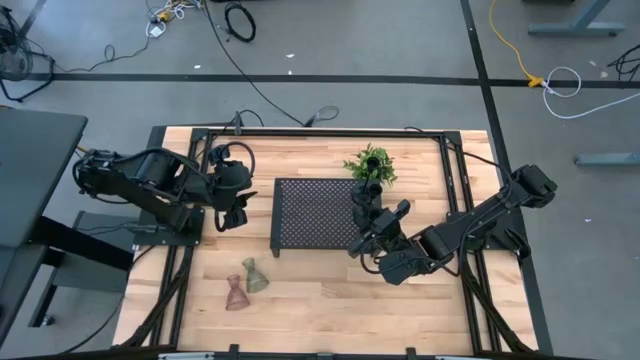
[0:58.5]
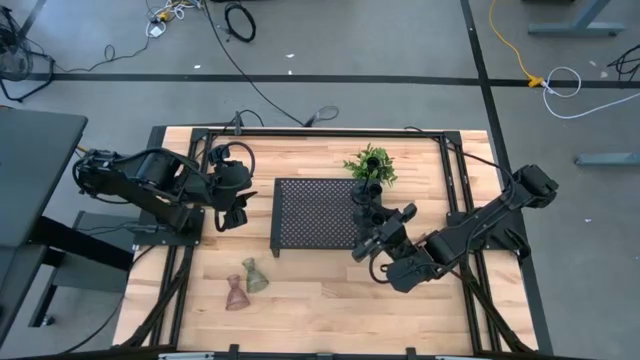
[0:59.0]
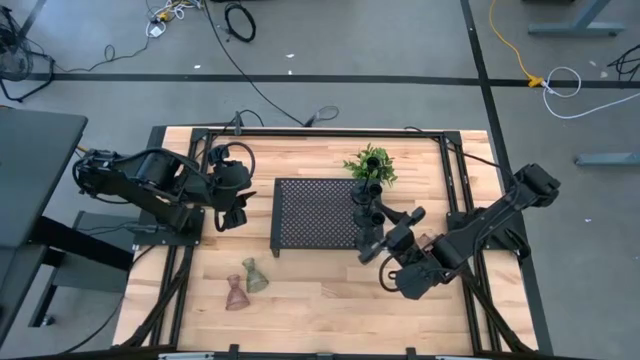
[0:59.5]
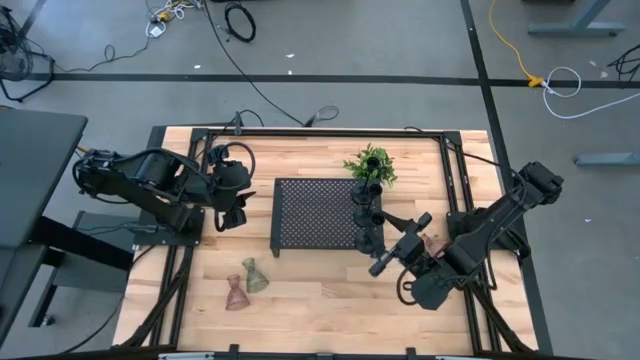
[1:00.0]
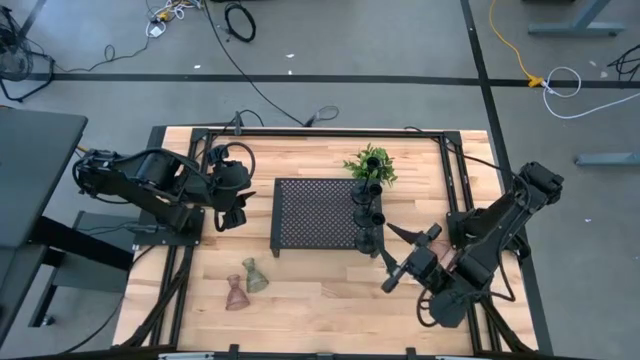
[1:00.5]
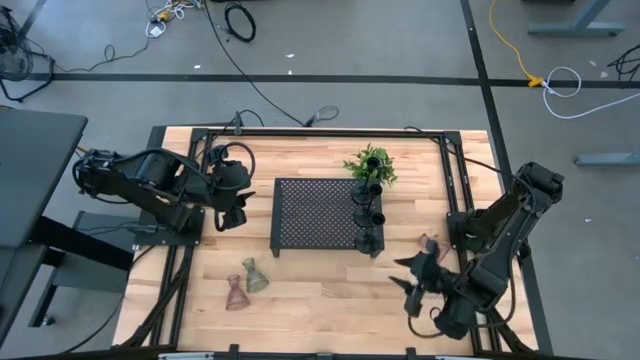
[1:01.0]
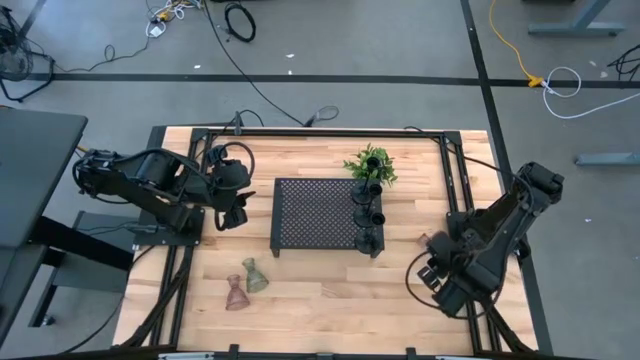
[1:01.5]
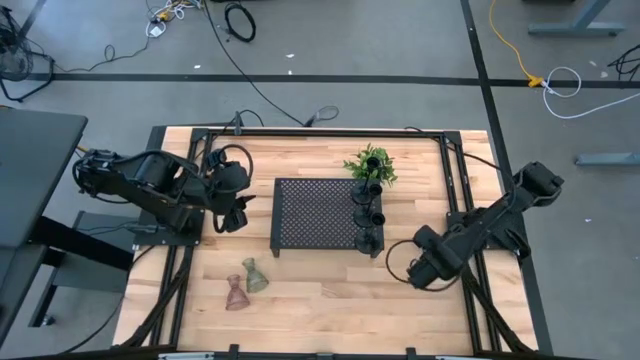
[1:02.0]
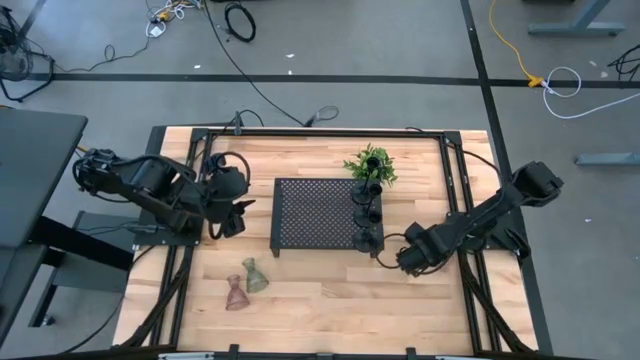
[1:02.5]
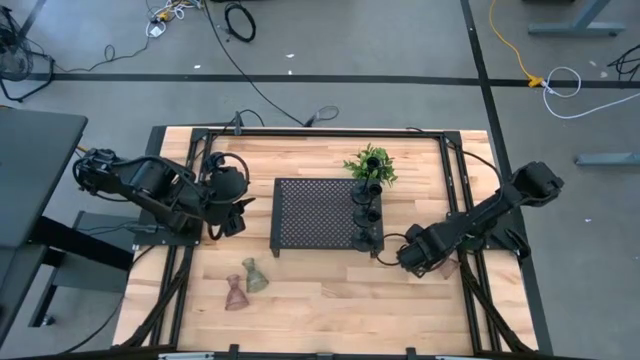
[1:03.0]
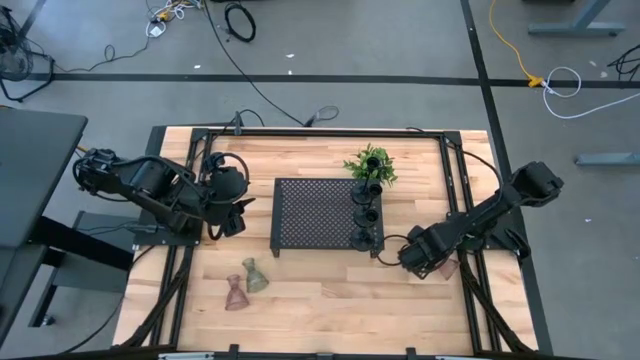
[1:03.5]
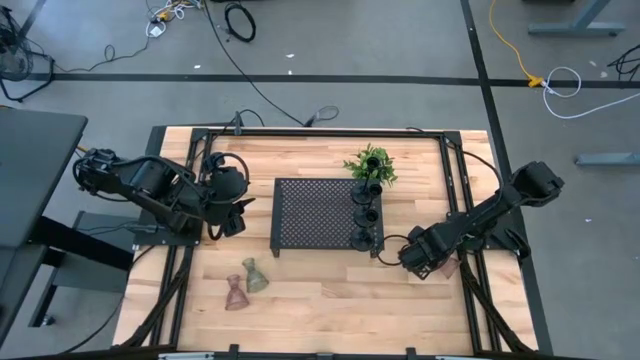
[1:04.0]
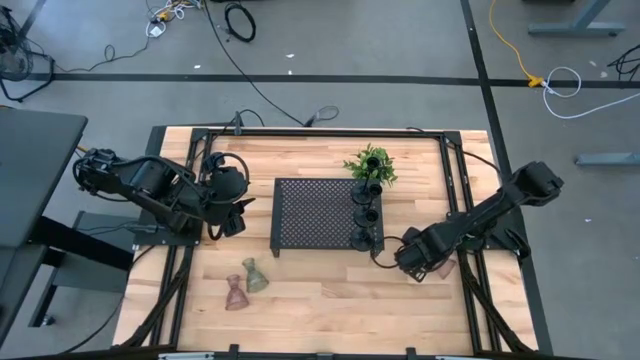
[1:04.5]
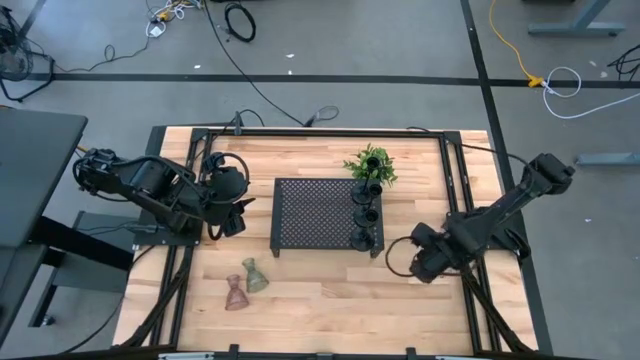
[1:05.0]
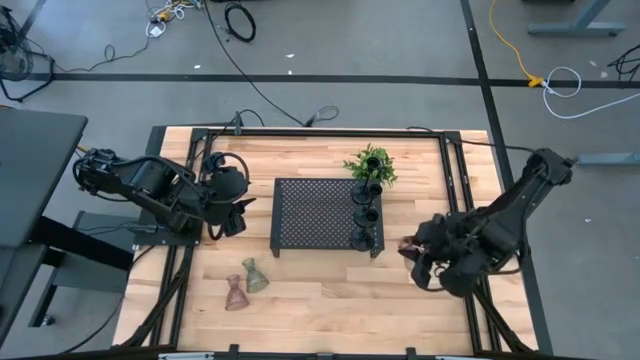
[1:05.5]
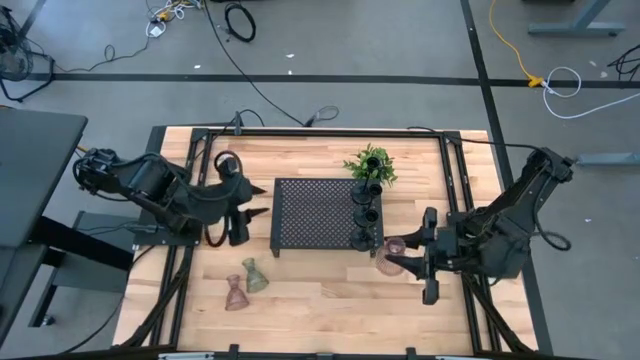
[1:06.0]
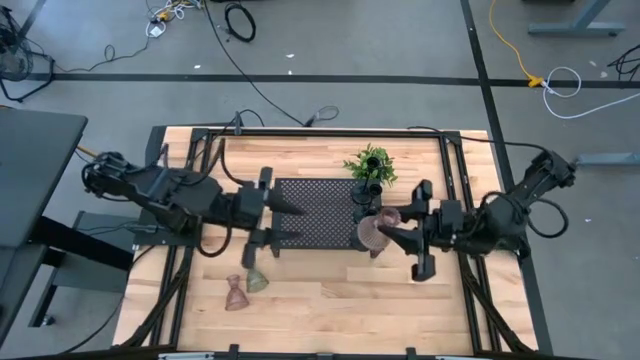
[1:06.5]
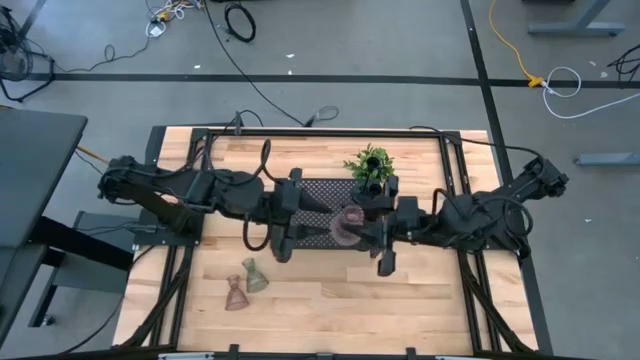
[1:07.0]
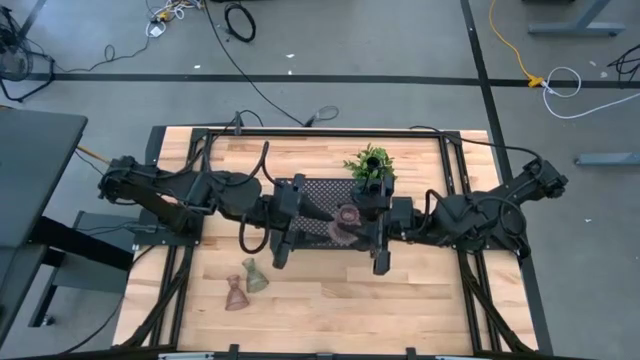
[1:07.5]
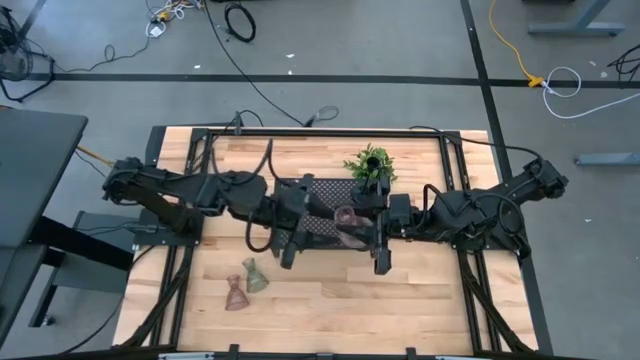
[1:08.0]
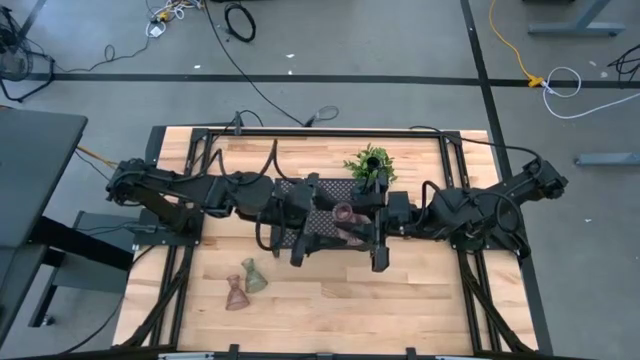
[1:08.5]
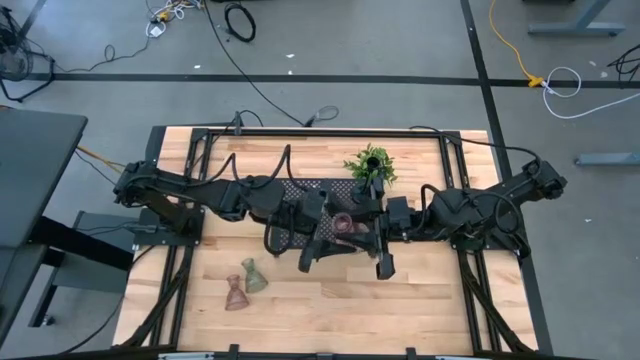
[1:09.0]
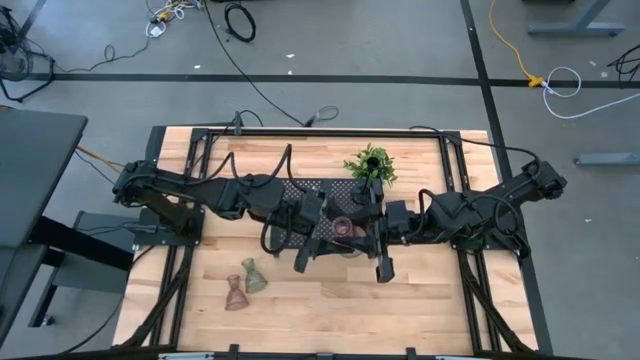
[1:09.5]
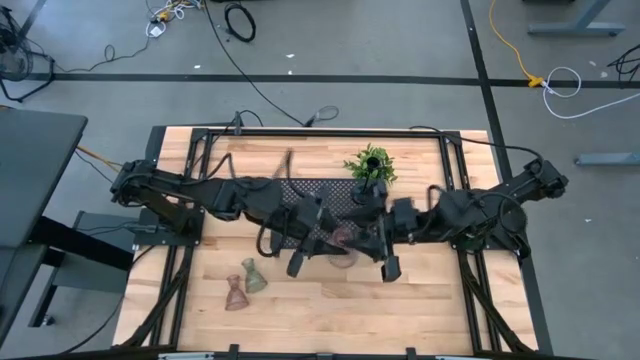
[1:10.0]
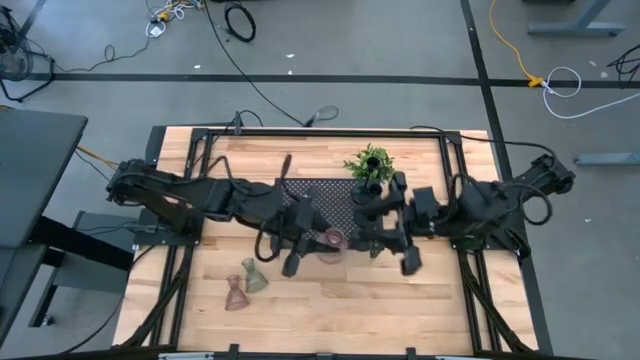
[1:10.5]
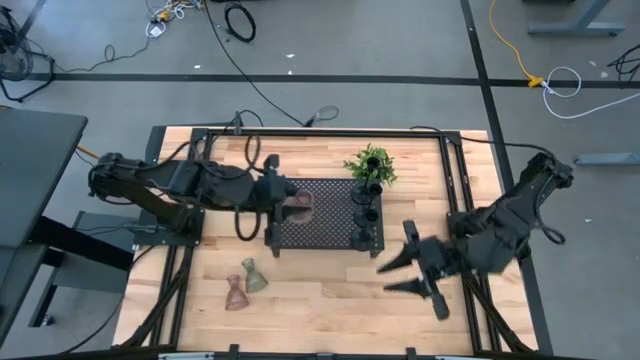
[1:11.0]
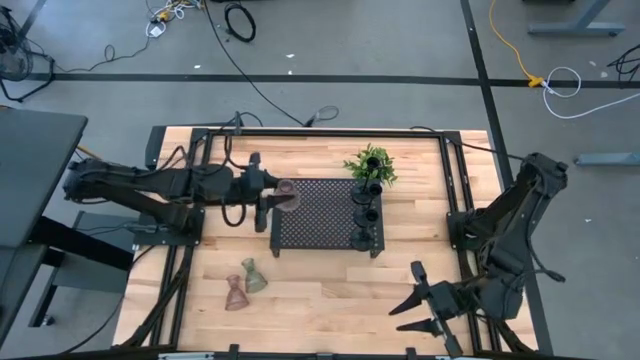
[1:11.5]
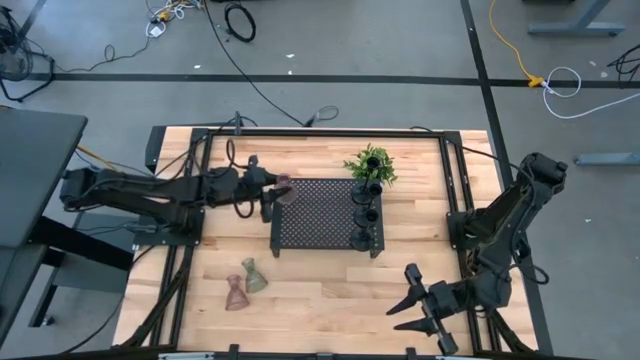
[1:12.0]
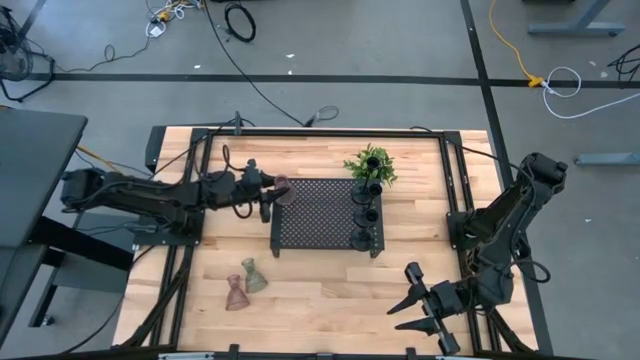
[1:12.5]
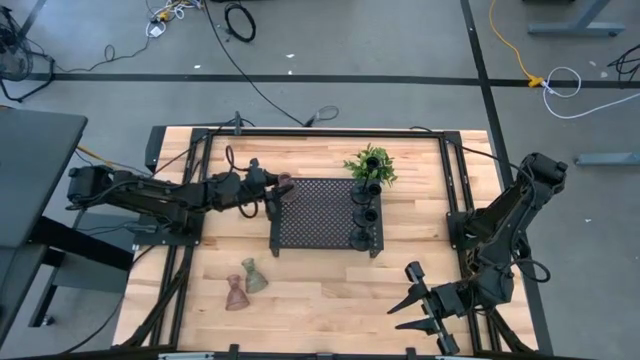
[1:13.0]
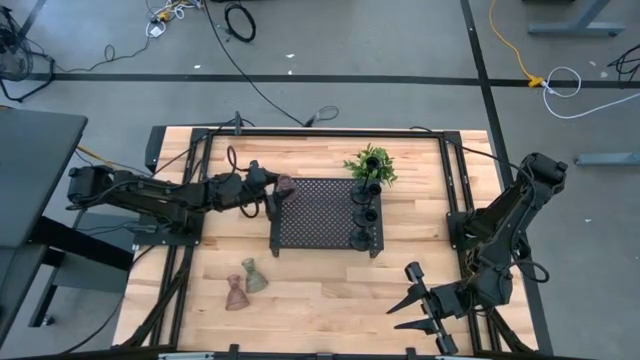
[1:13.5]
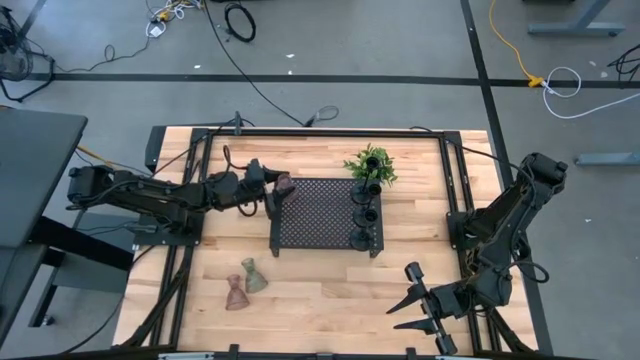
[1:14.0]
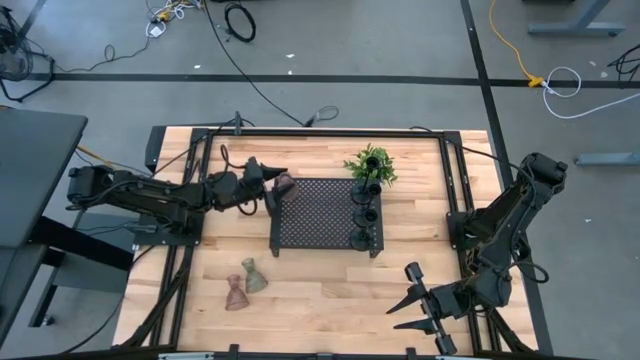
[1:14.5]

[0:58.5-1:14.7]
Task: Pick & Place candle stick holders
Put the right pink glass candle stick holder on the shelf

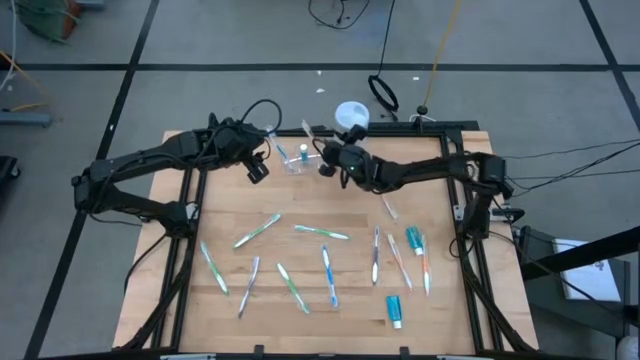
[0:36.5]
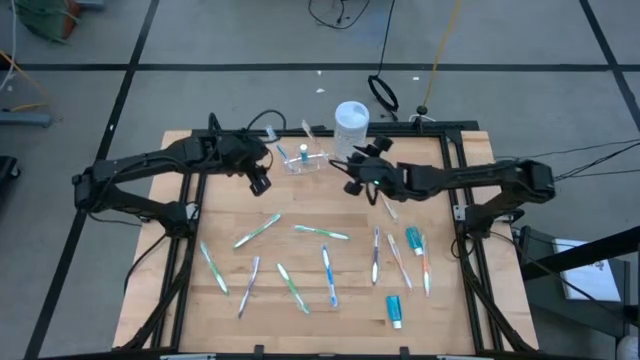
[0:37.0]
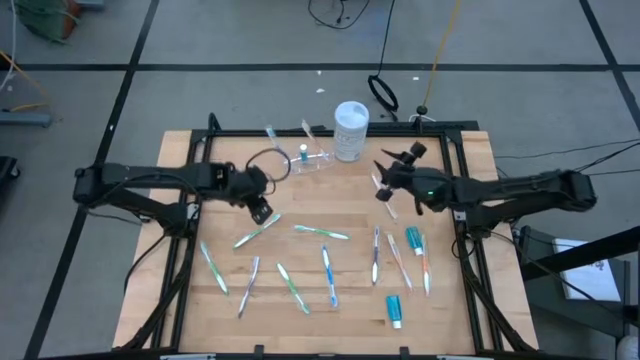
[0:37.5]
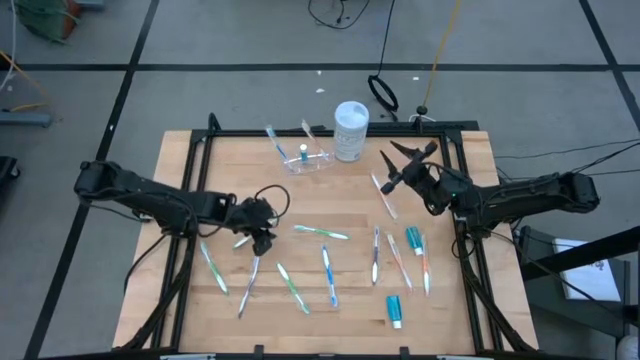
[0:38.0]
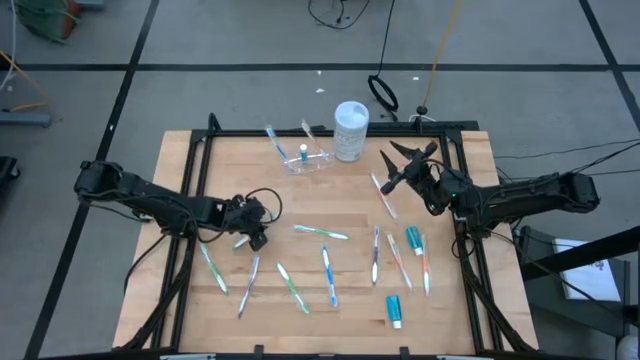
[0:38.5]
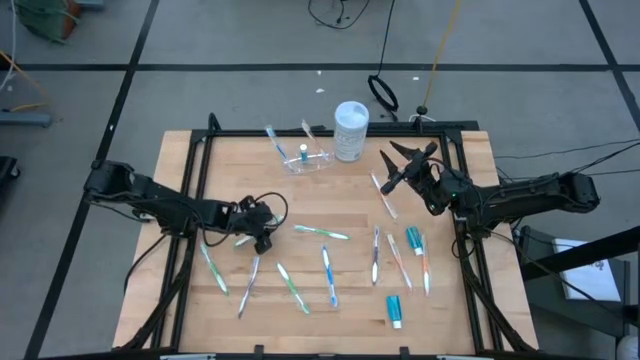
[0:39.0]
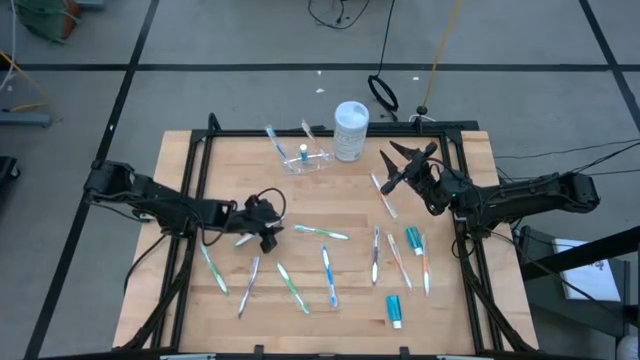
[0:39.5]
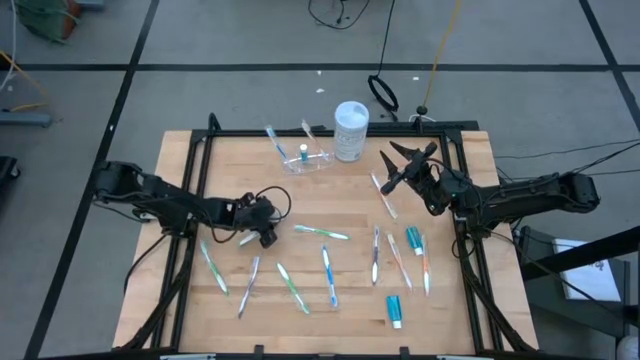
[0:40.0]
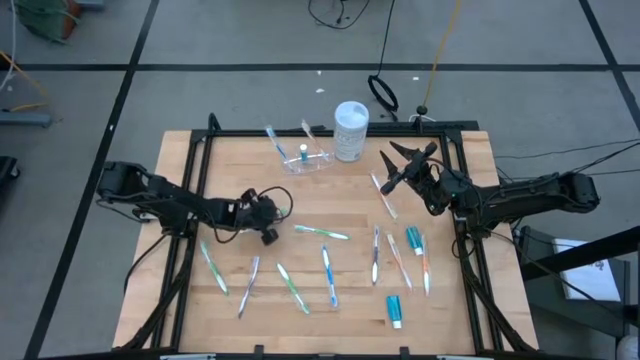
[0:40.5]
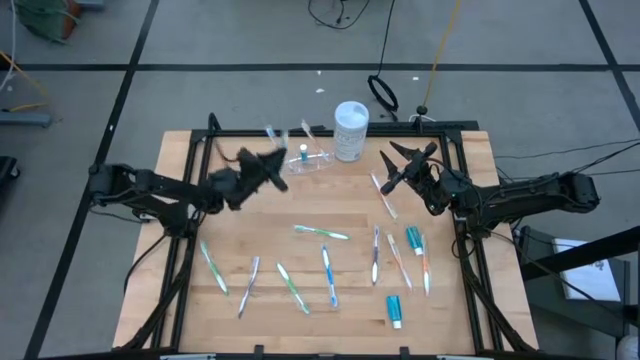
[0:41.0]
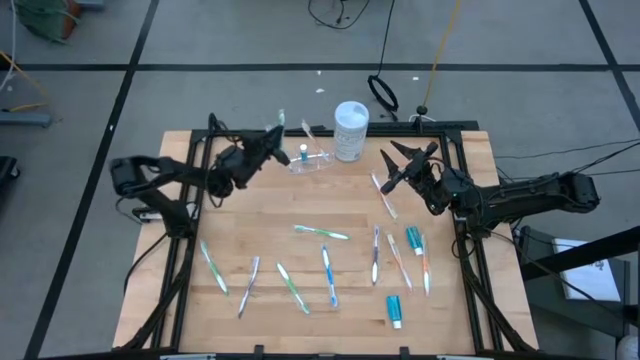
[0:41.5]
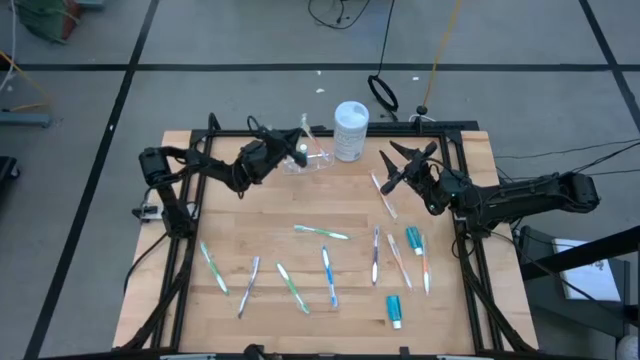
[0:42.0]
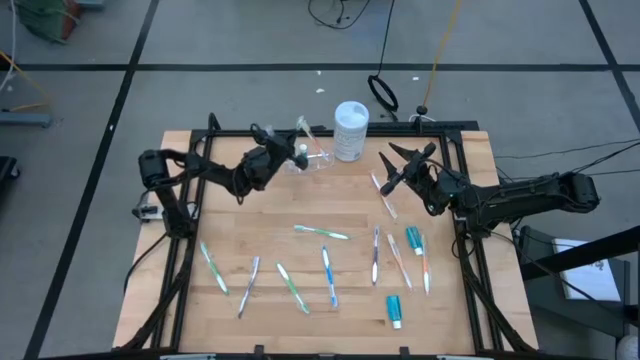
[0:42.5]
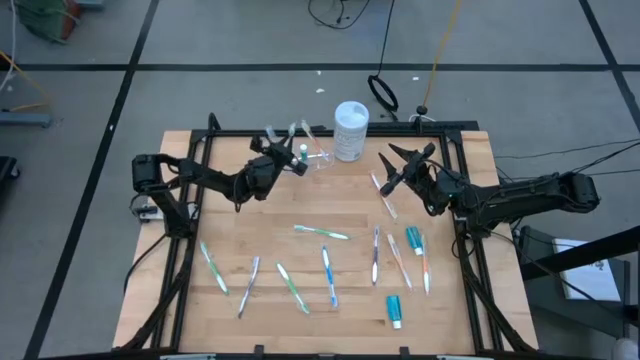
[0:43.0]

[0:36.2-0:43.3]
Task: Pick & Place toothbrushing station
Put the green toothbrush into the transparent organizer
